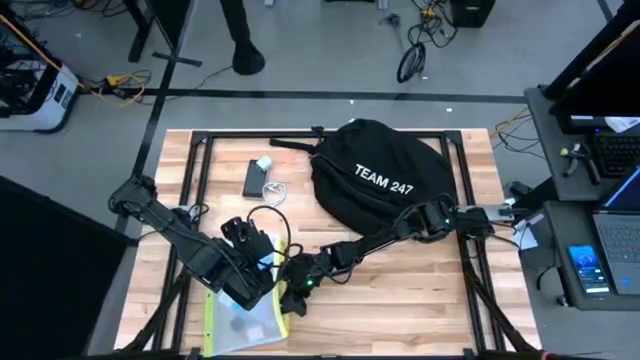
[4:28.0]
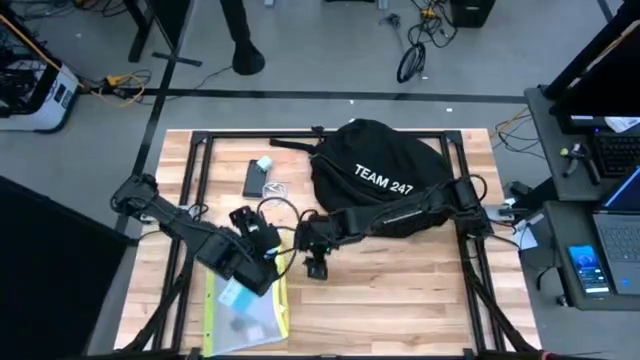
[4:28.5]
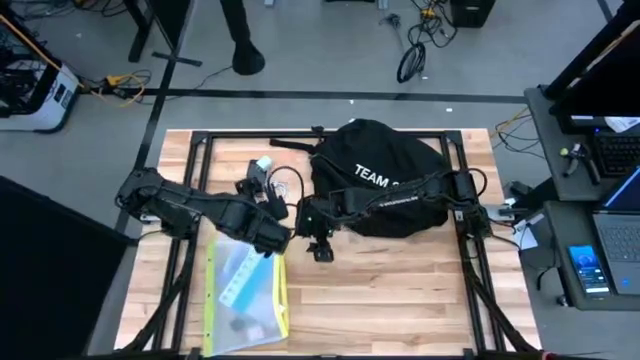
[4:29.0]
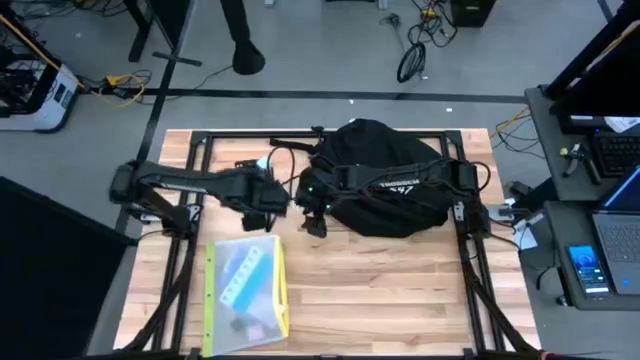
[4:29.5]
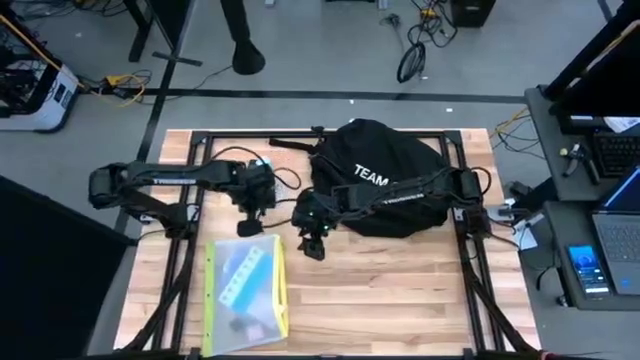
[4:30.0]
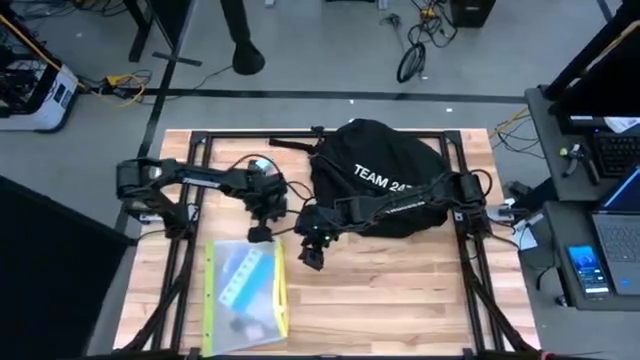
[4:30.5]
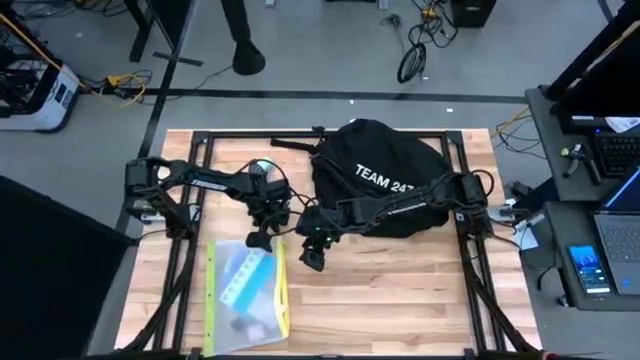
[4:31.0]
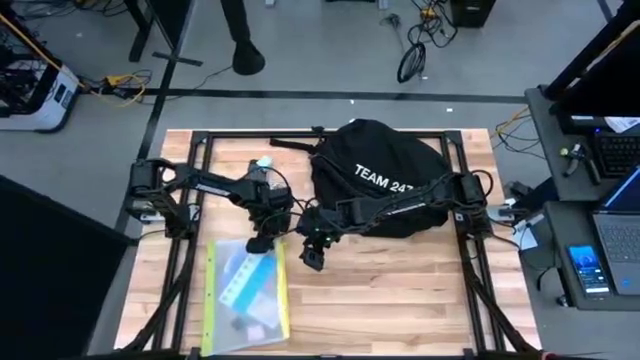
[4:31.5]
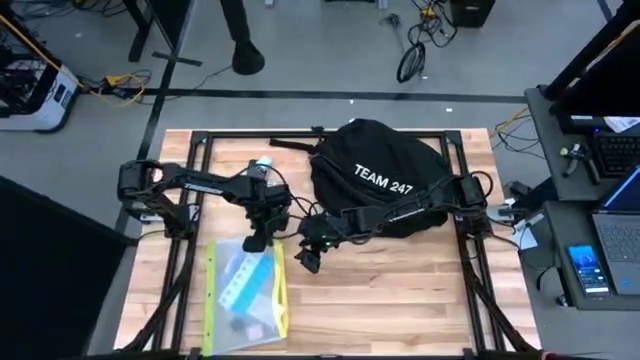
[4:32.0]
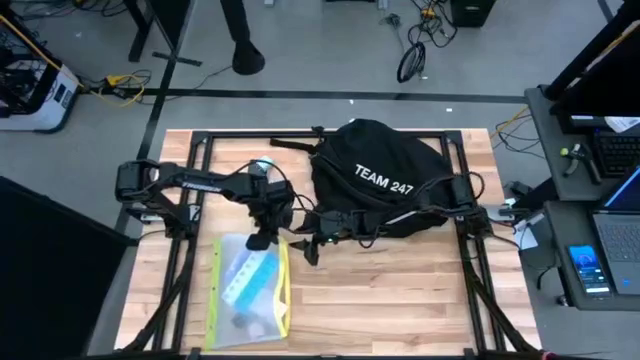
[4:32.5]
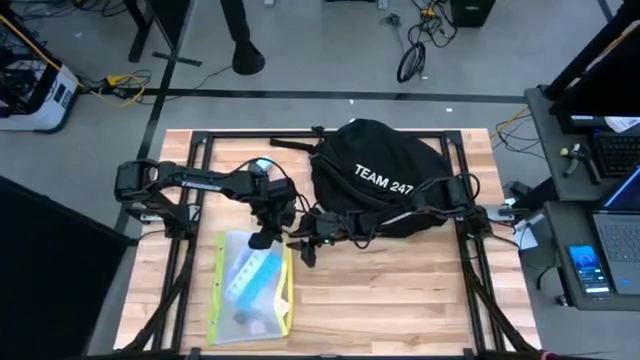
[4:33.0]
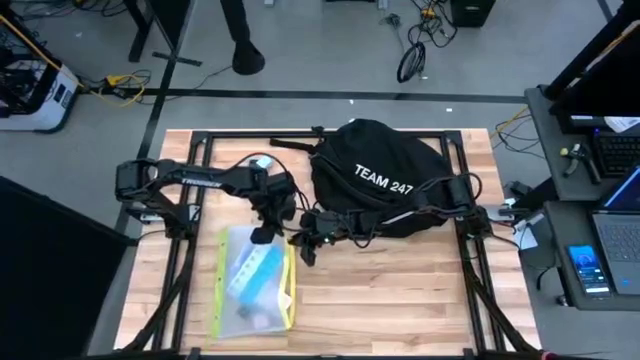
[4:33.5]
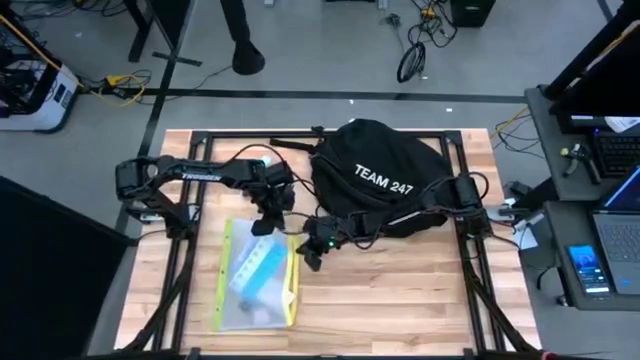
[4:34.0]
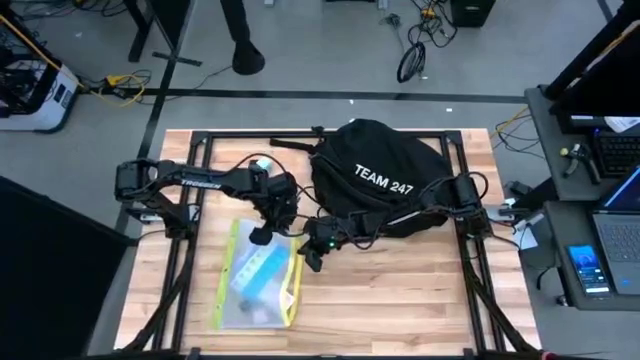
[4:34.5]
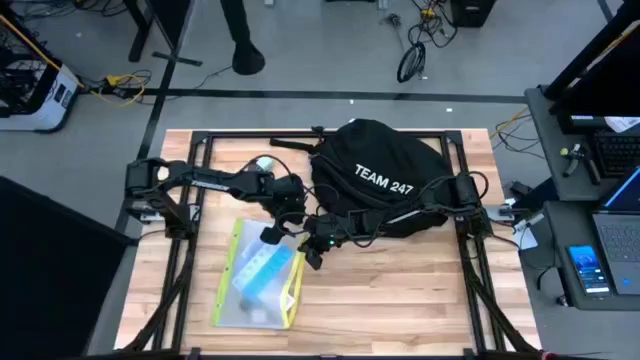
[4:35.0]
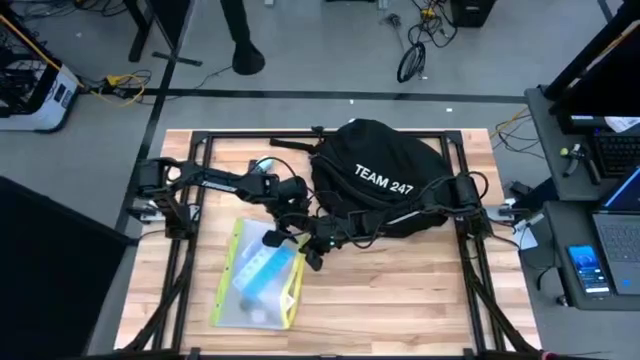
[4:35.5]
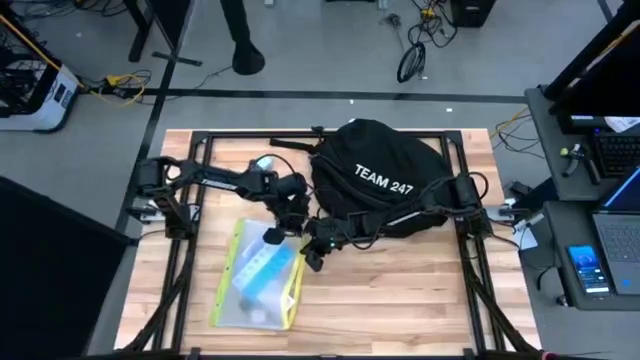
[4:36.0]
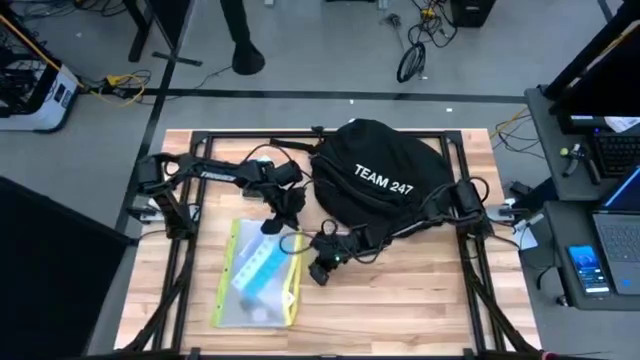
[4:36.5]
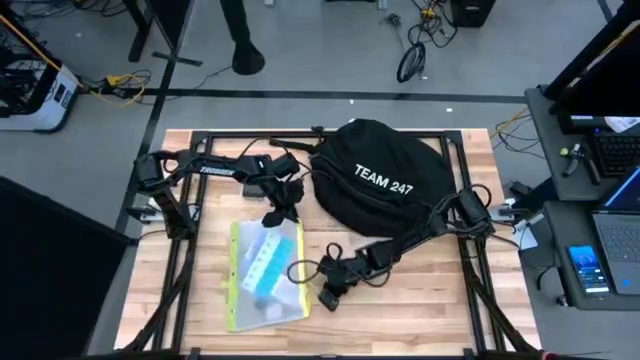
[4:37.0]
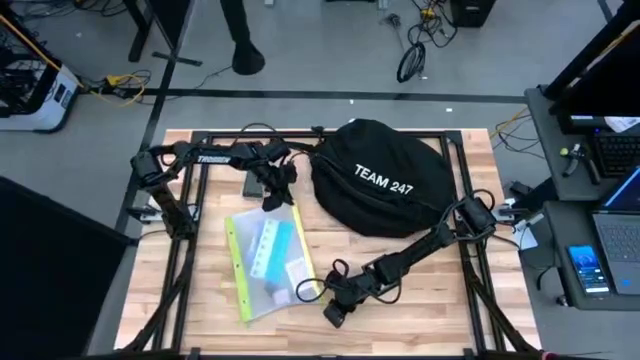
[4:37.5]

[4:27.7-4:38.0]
Task: Unpack backpack
Close the green zip bag

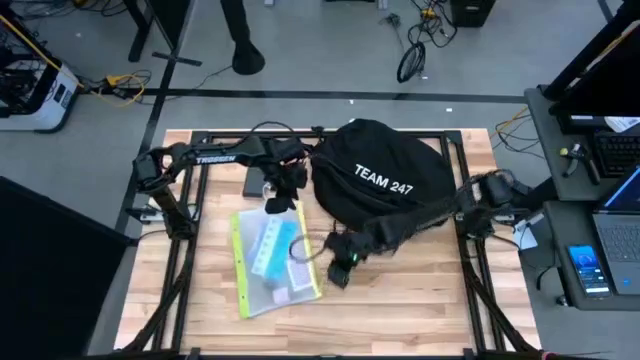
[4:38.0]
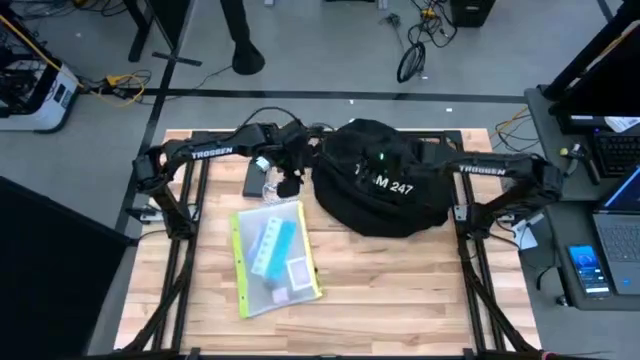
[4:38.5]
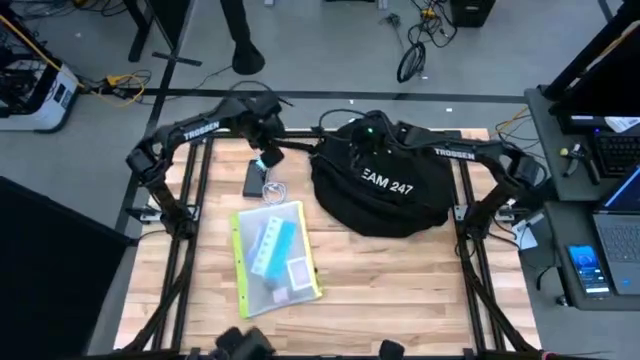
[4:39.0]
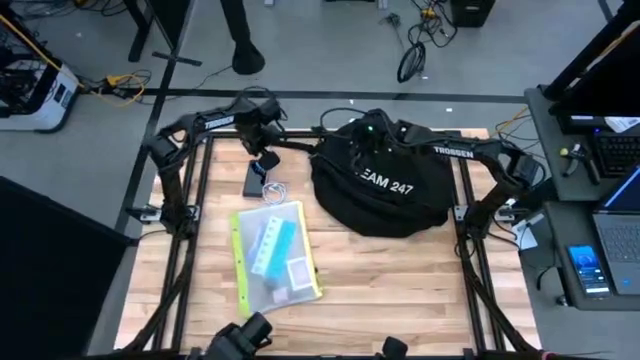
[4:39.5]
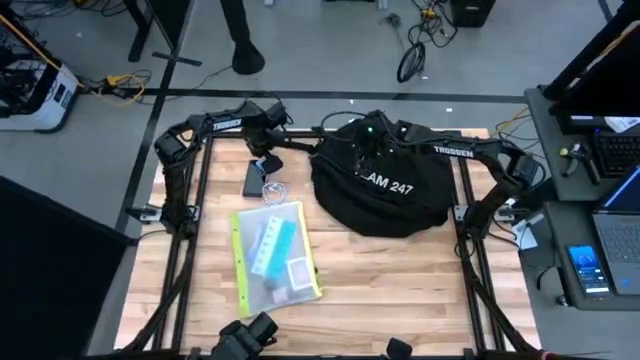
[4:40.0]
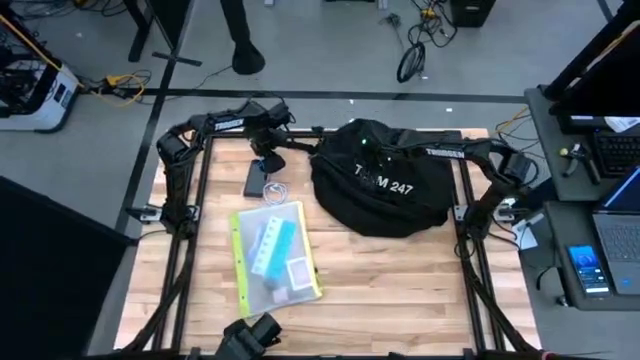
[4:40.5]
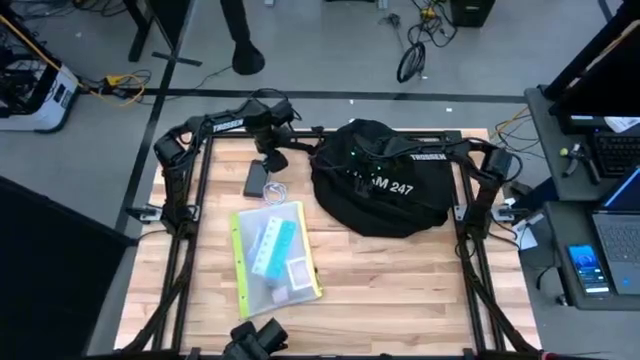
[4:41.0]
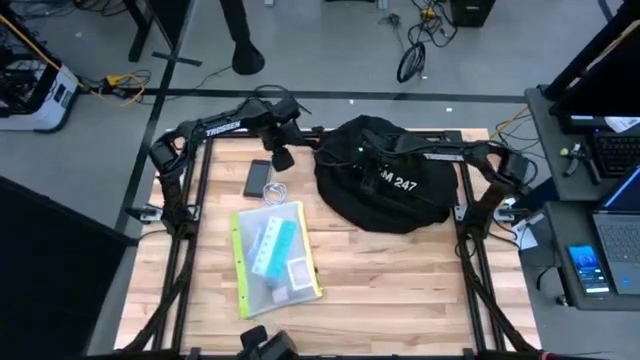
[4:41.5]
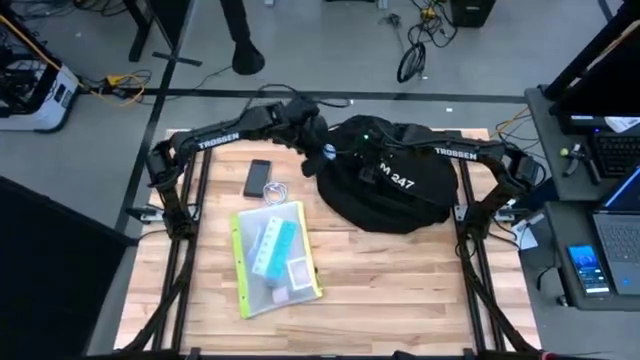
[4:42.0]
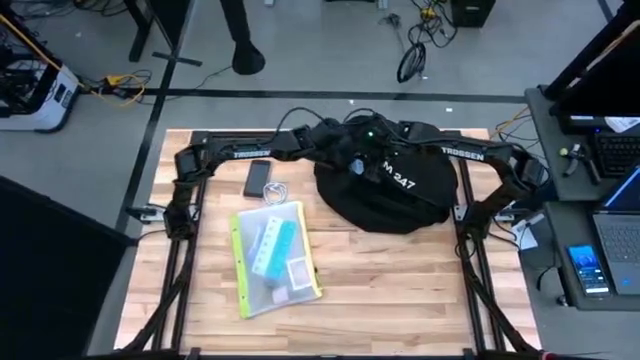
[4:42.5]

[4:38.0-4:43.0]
Put the white charger adapter into the black backpack

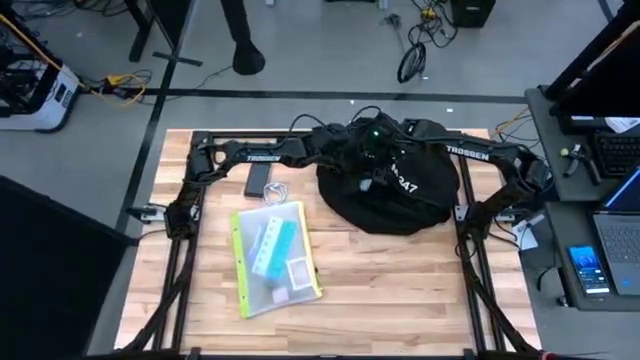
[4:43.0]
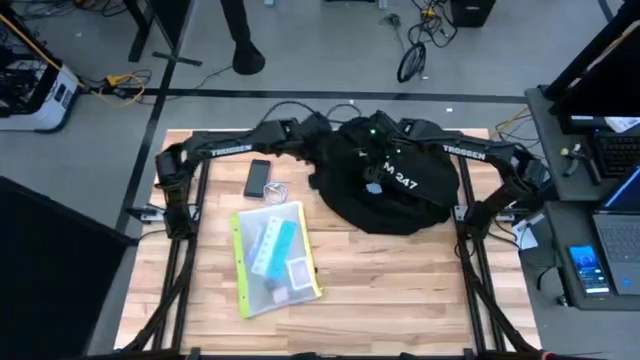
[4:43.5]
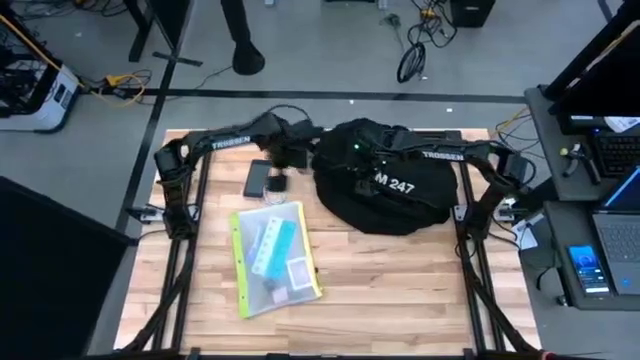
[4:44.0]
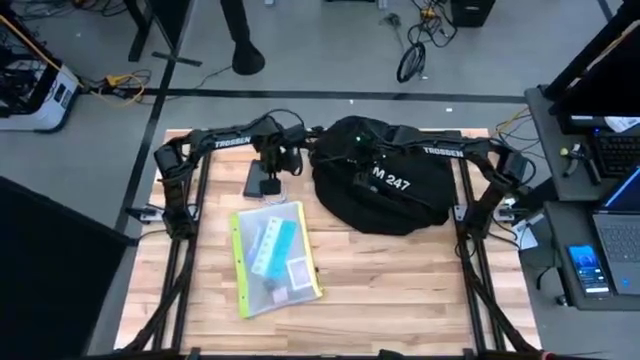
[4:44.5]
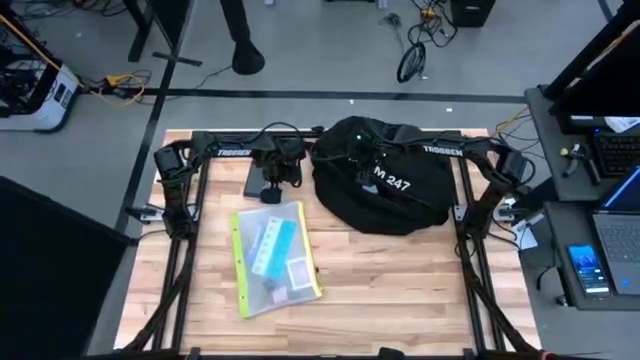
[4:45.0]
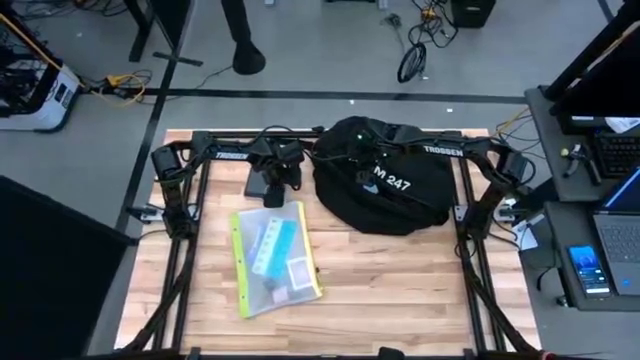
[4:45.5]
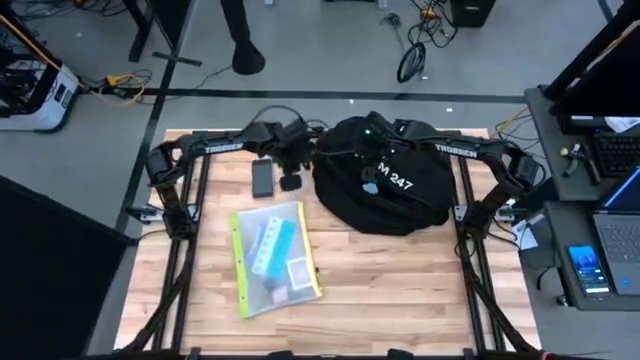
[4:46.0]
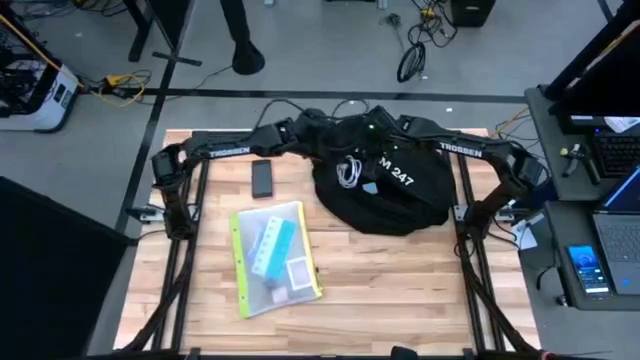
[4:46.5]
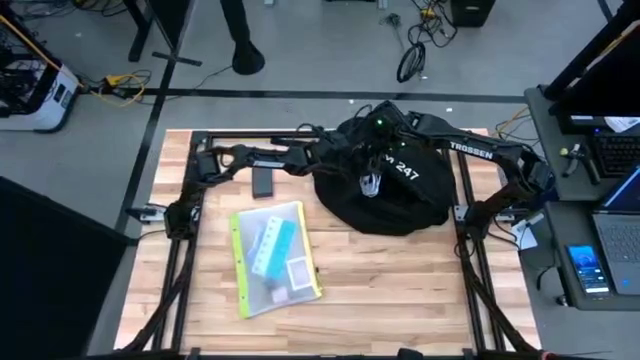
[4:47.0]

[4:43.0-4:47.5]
Put the charger cable into the black backpack

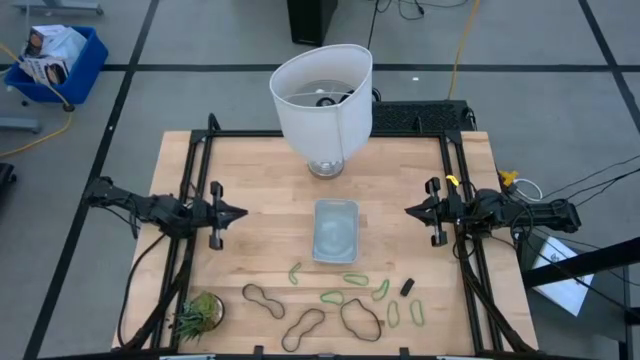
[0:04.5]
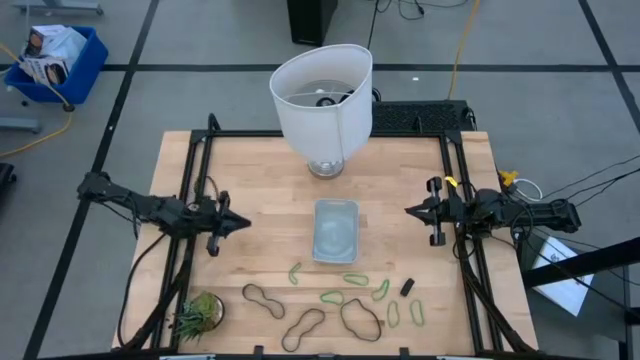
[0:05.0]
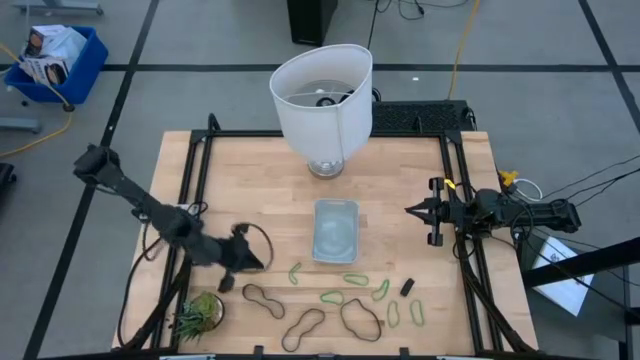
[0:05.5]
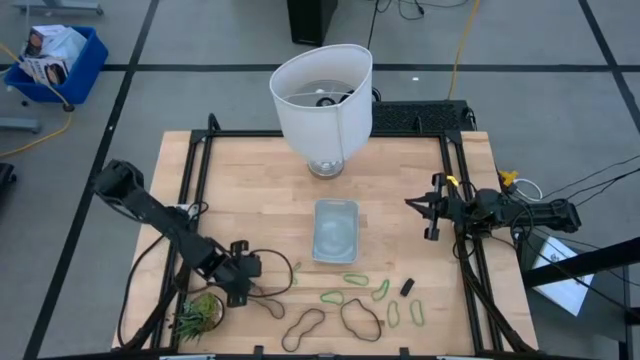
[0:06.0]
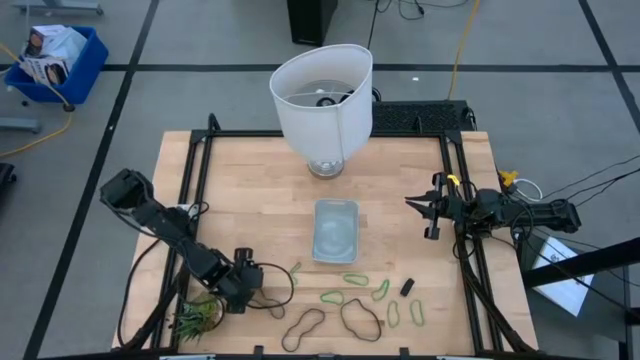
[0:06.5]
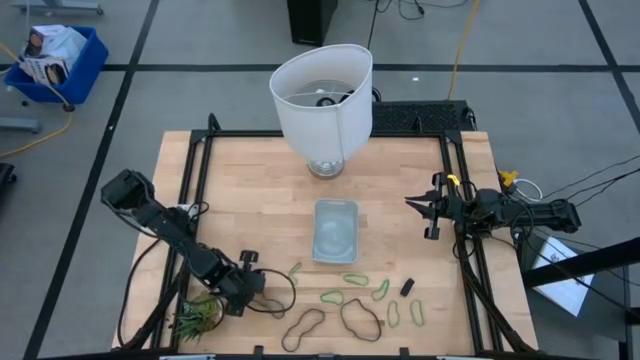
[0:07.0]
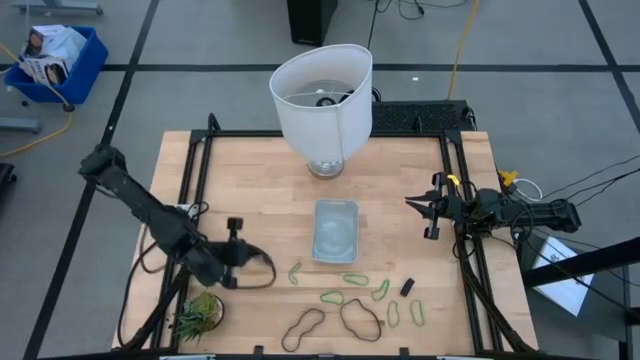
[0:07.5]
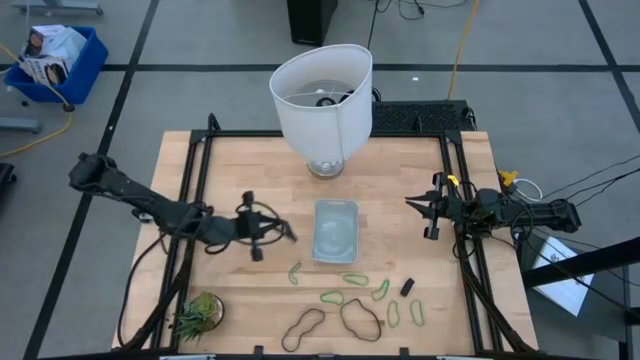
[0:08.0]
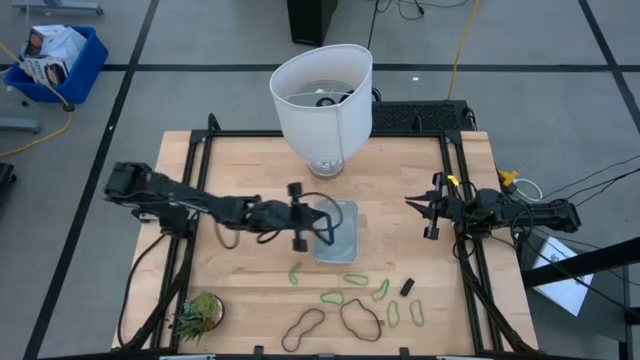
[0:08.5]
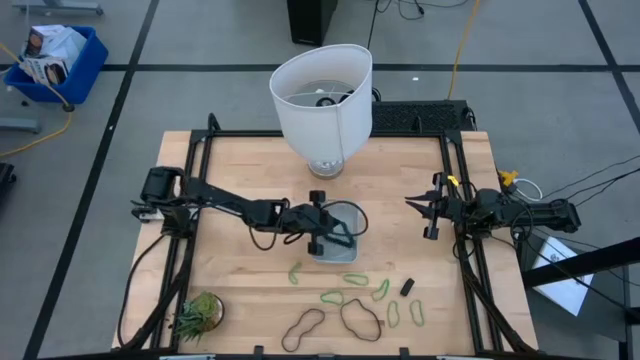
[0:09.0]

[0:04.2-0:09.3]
Task: Pick and place rubber bands into bin
Put the black rubber band into the gray bin
